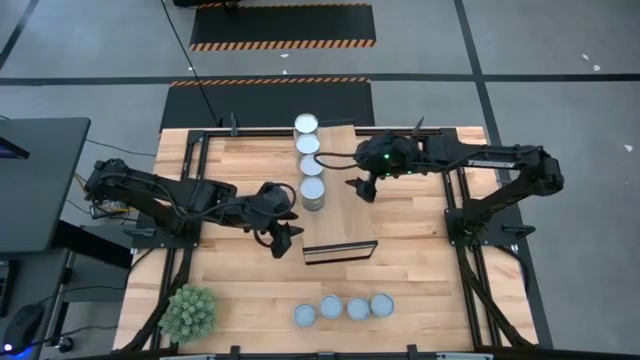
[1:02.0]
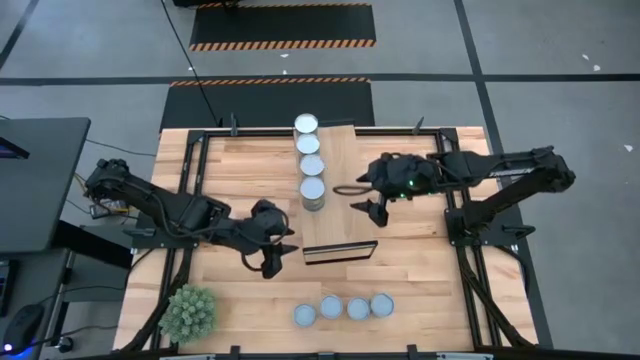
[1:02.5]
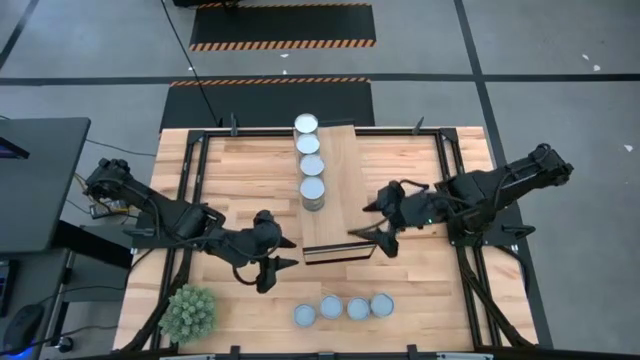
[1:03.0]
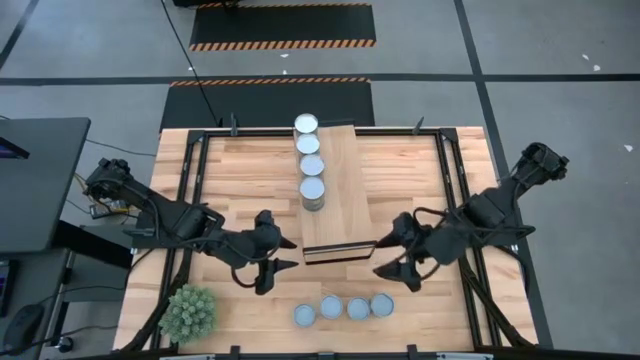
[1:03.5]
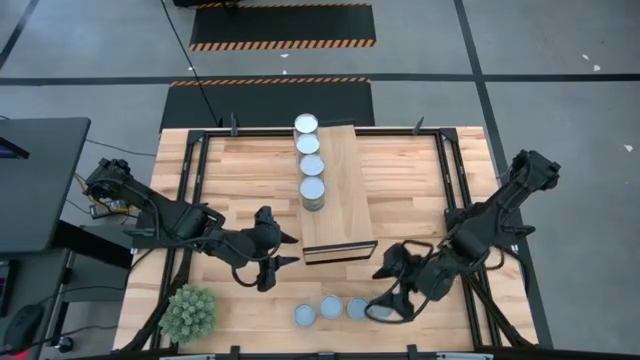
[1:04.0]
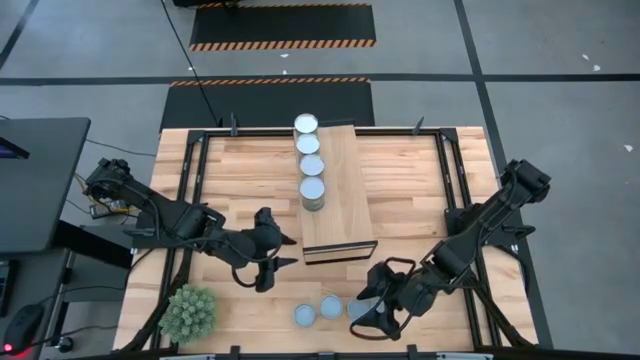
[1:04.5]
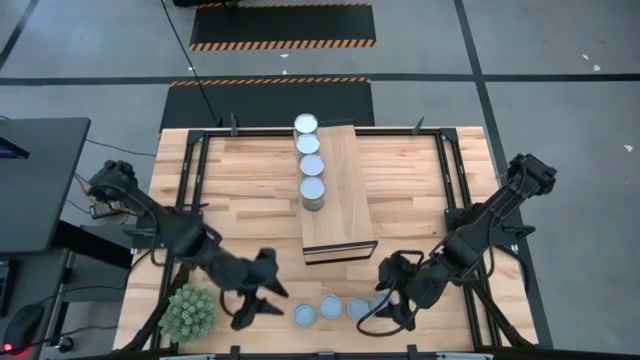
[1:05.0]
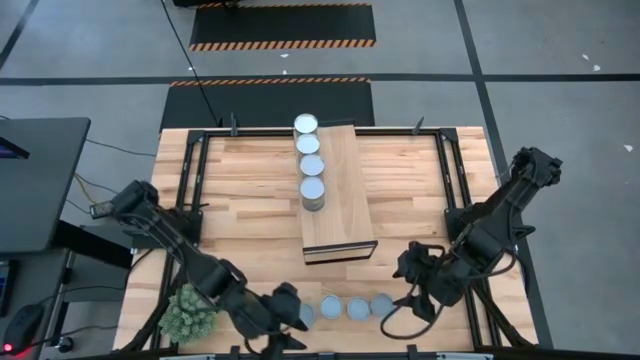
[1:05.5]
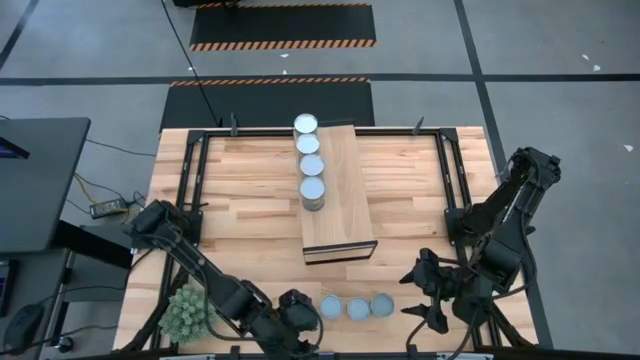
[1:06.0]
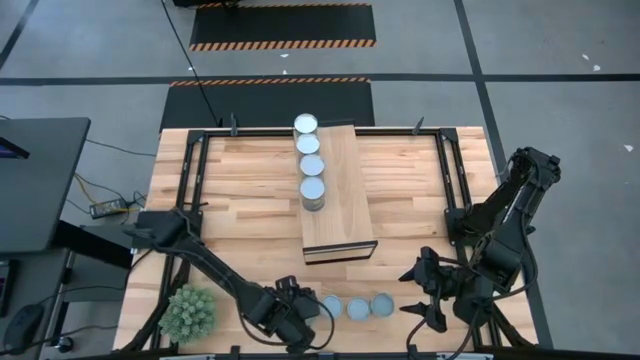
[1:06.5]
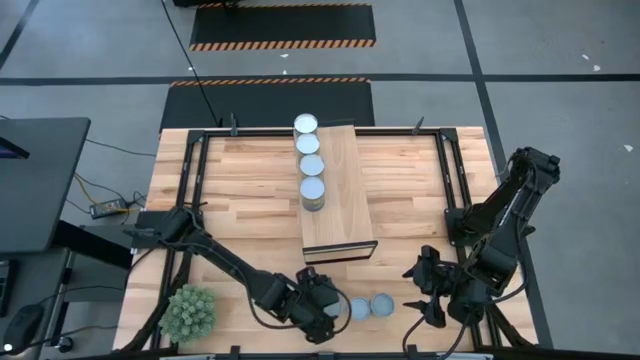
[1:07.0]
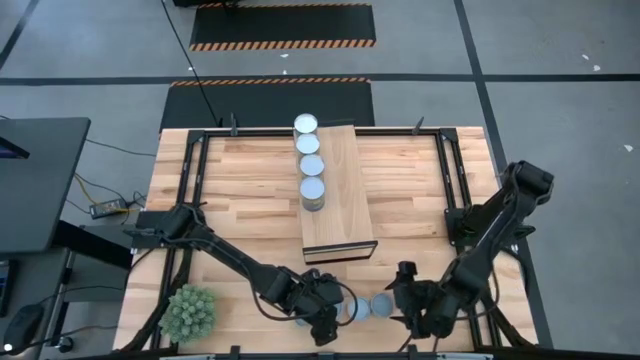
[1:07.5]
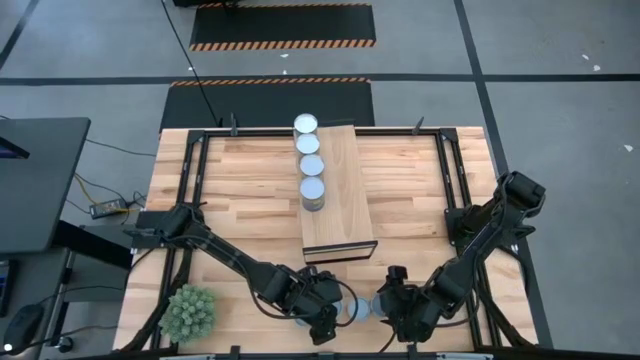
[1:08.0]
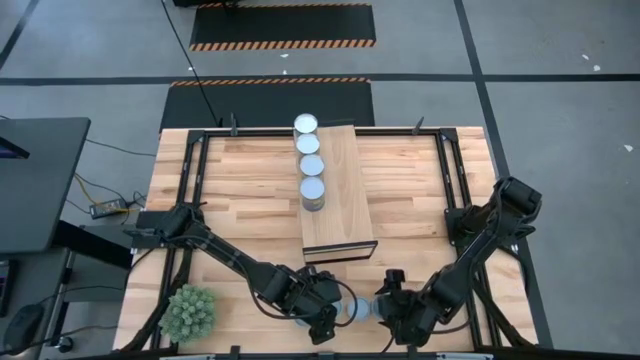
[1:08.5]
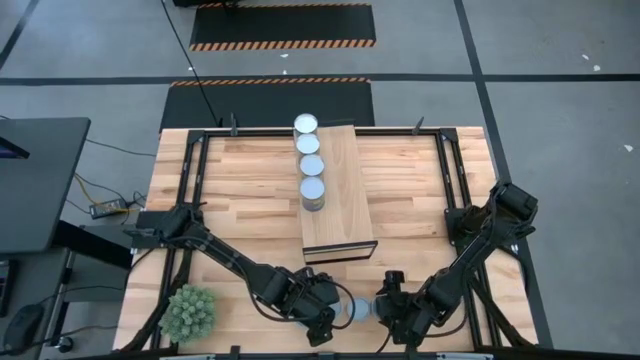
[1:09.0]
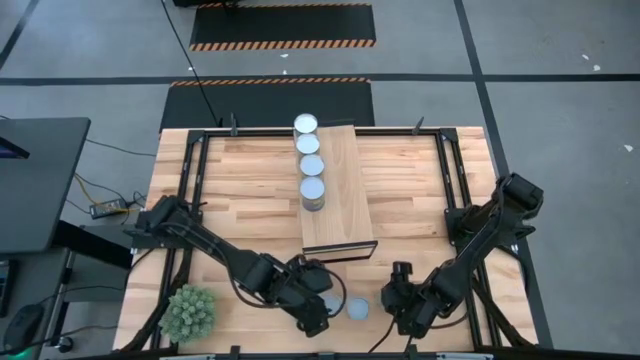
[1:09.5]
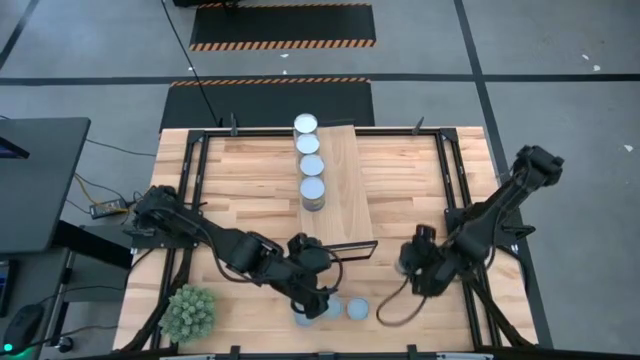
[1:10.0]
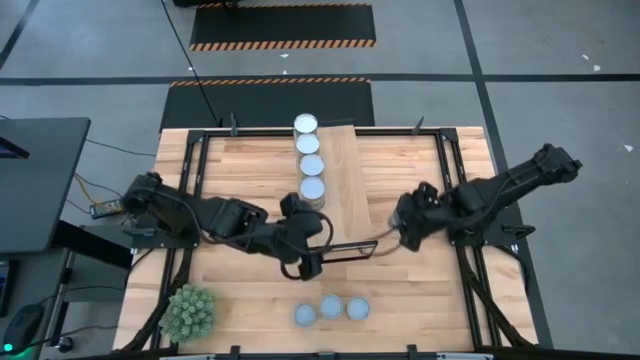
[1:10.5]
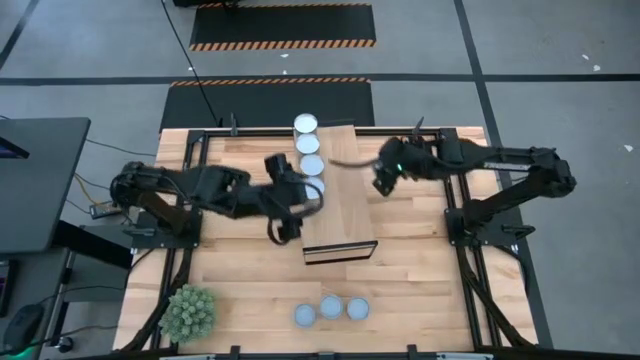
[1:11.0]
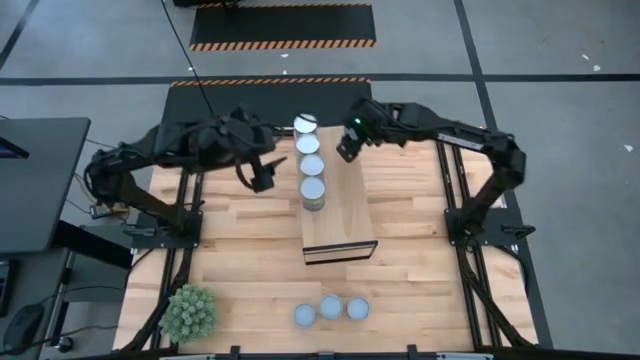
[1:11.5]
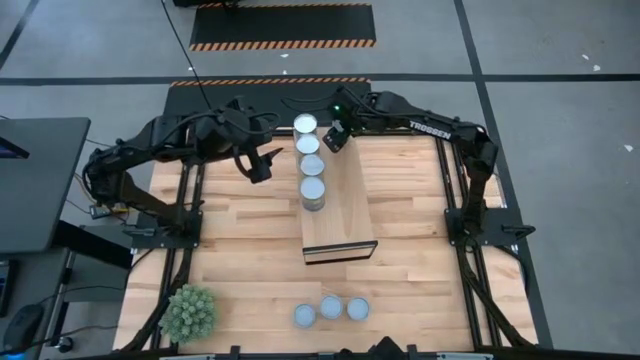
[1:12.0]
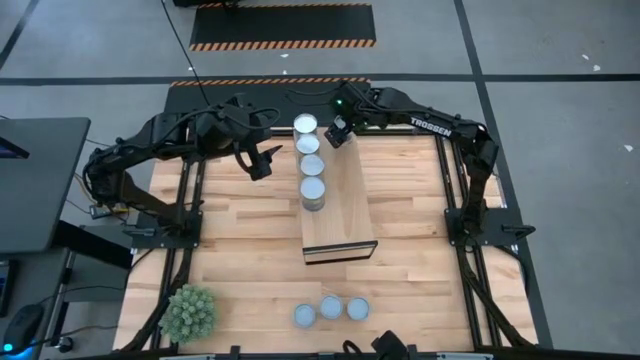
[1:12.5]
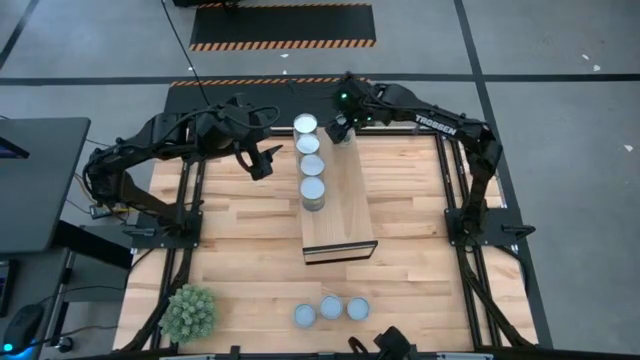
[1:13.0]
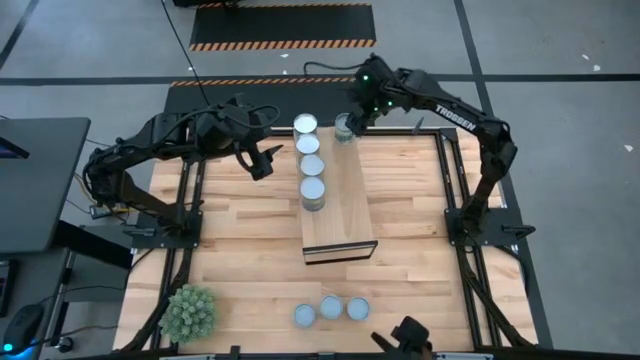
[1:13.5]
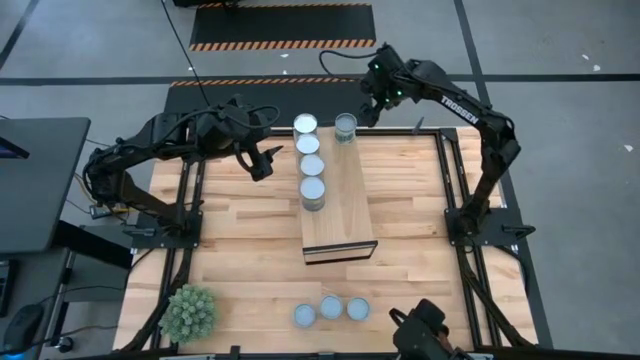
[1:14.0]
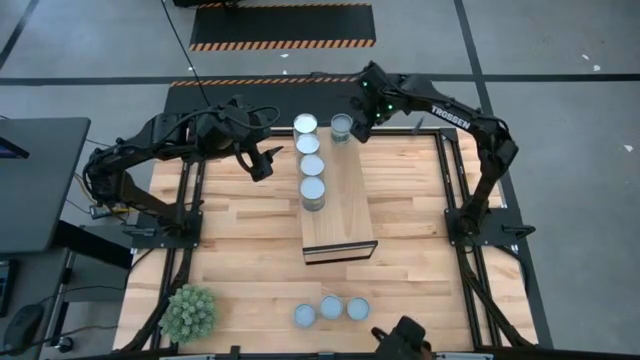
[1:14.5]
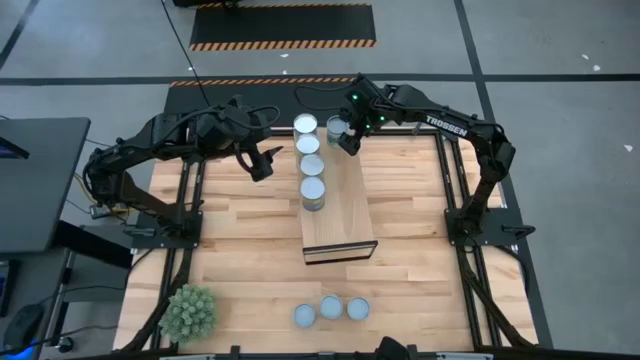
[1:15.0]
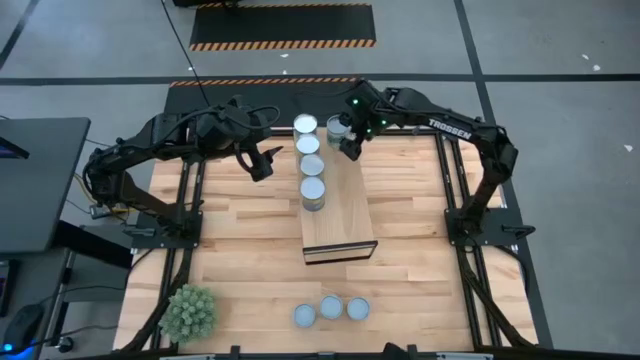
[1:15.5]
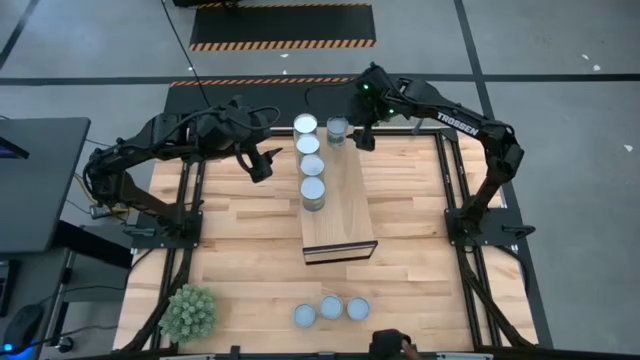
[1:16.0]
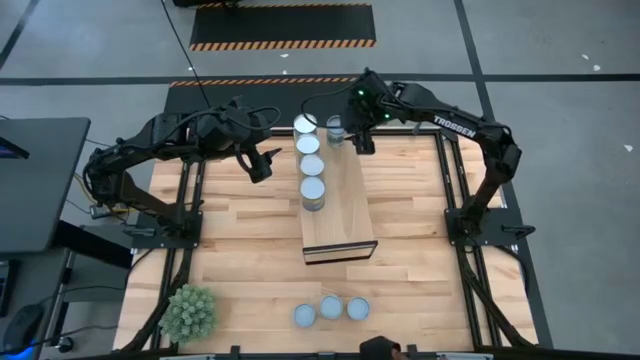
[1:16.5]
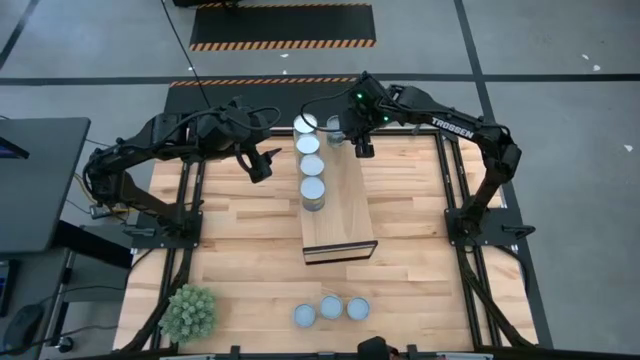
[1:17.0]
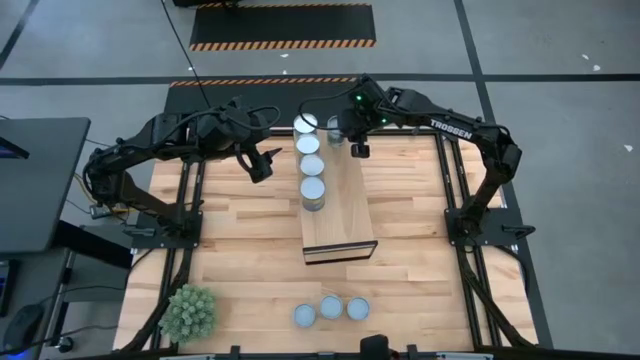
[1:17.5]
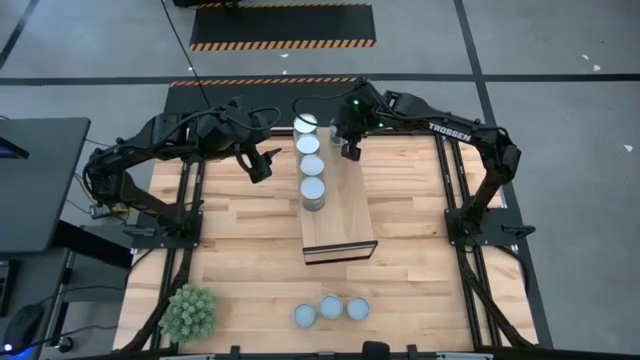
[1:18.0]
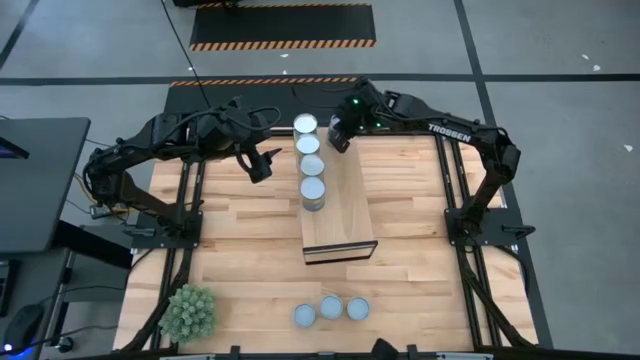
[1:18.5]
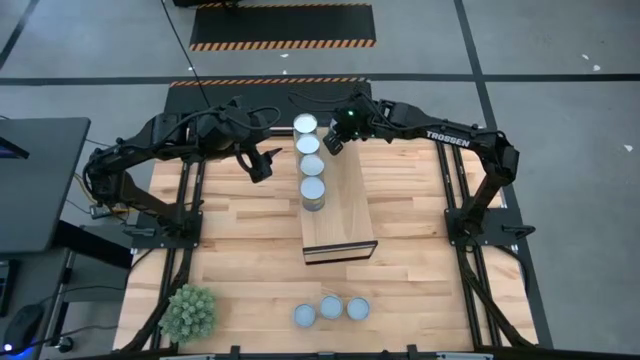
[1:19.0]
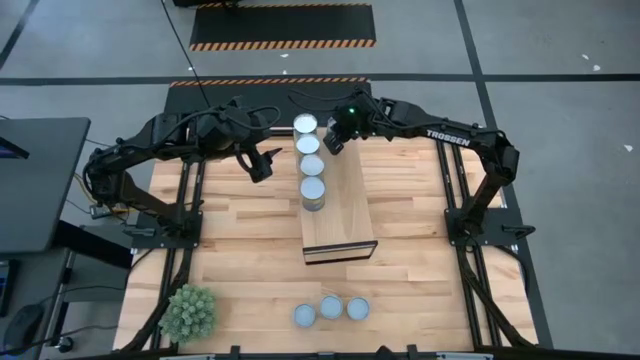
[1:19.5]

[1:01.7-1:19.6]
Task: Pick and place cans onto a shelf
Put the canned mixed vegetables on the shelf
